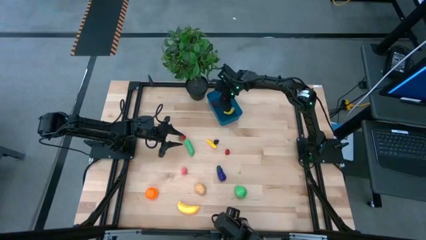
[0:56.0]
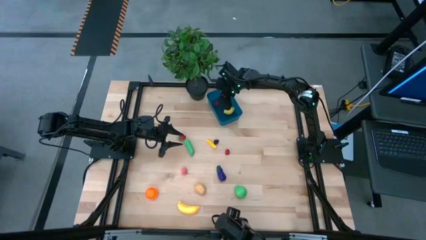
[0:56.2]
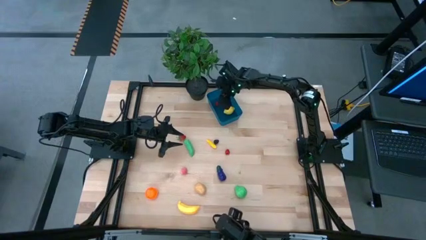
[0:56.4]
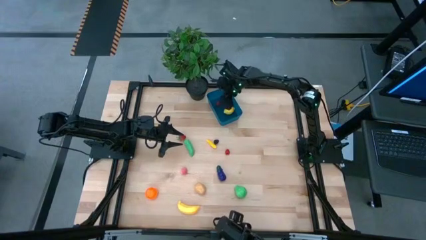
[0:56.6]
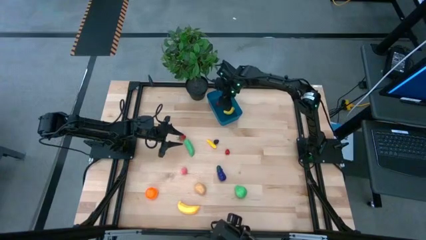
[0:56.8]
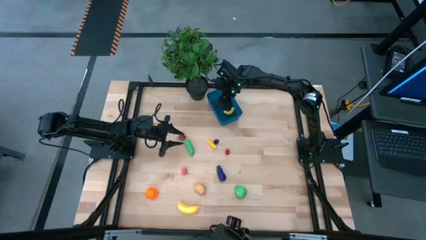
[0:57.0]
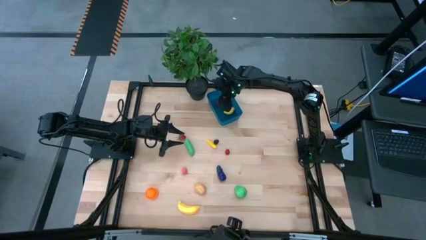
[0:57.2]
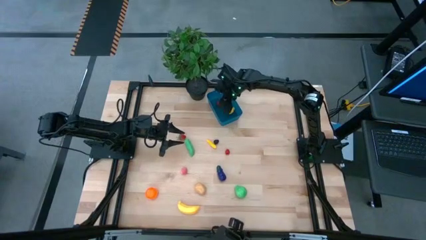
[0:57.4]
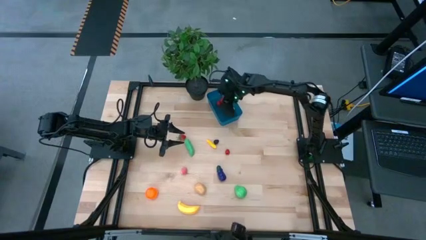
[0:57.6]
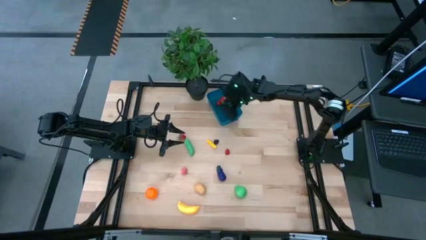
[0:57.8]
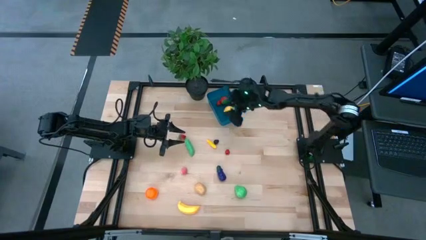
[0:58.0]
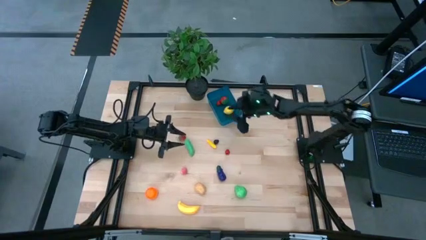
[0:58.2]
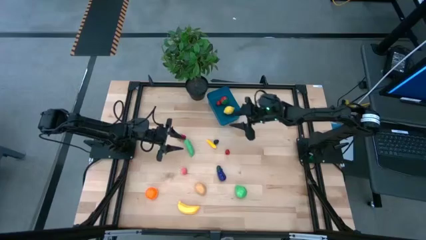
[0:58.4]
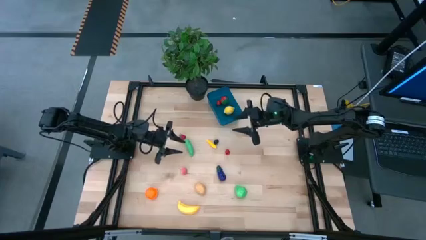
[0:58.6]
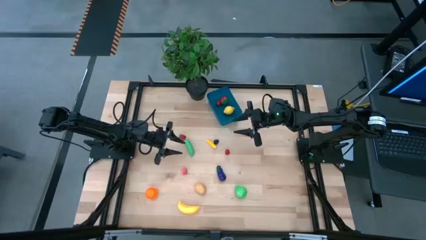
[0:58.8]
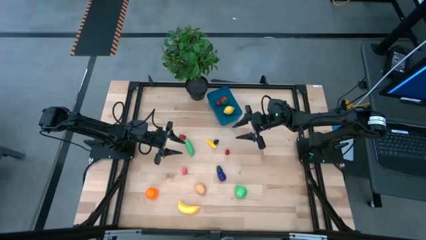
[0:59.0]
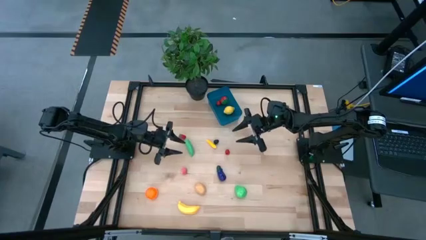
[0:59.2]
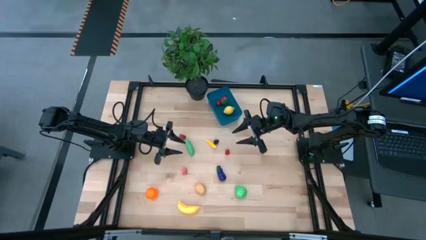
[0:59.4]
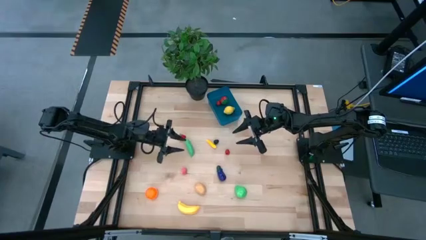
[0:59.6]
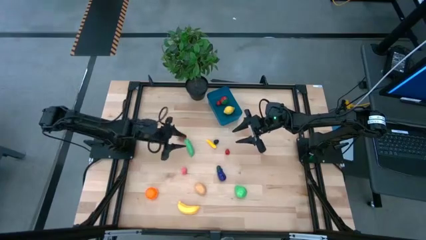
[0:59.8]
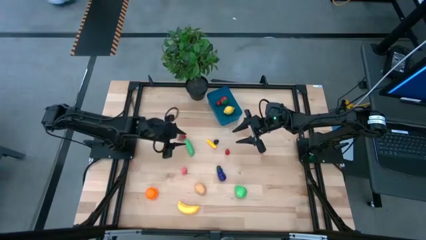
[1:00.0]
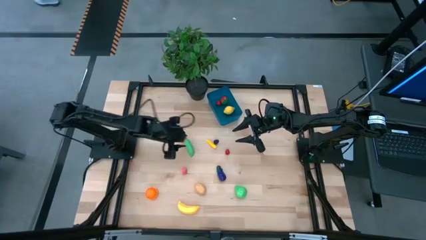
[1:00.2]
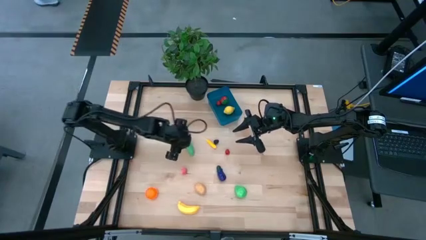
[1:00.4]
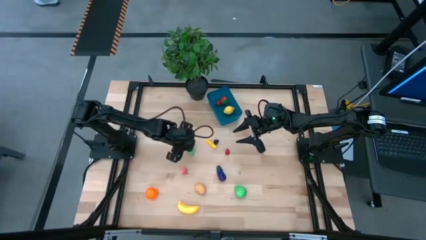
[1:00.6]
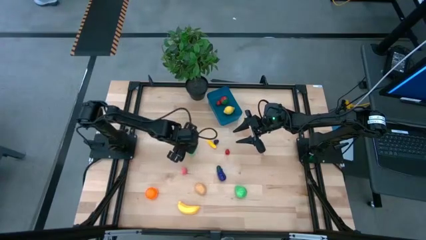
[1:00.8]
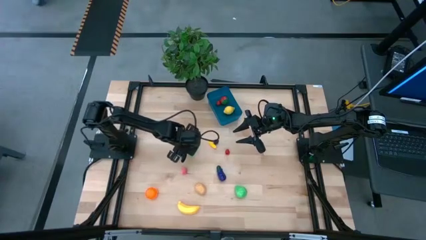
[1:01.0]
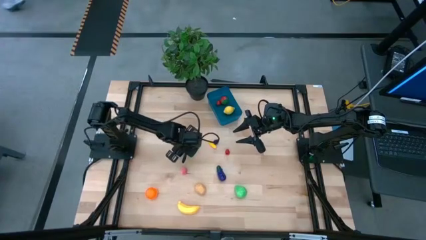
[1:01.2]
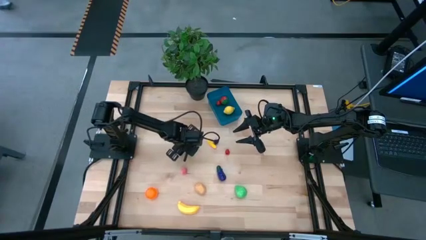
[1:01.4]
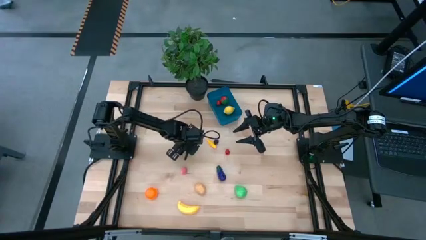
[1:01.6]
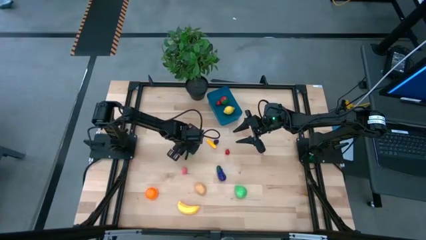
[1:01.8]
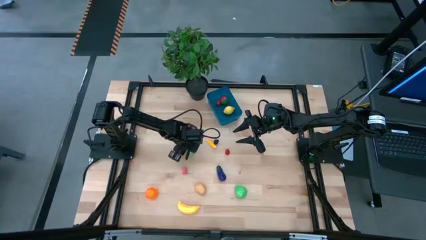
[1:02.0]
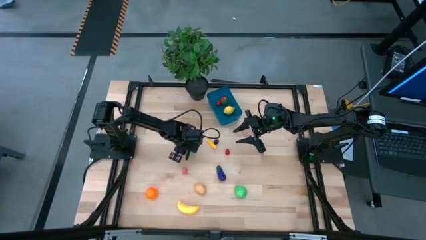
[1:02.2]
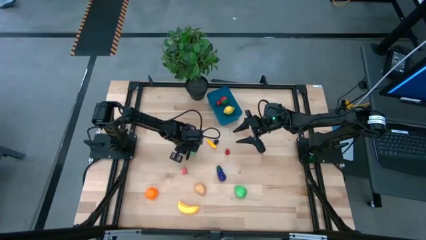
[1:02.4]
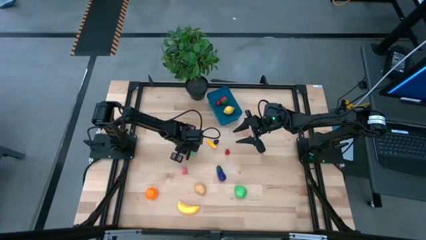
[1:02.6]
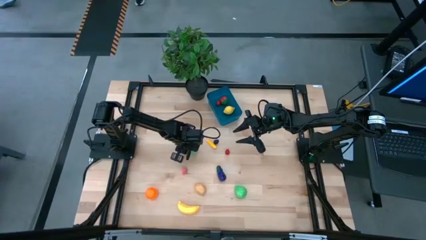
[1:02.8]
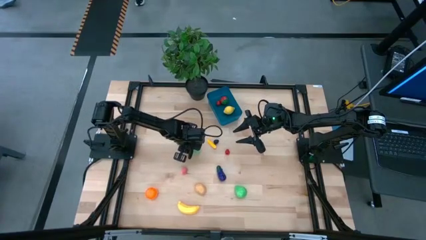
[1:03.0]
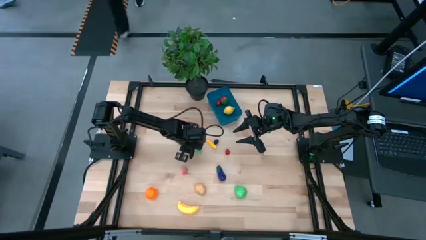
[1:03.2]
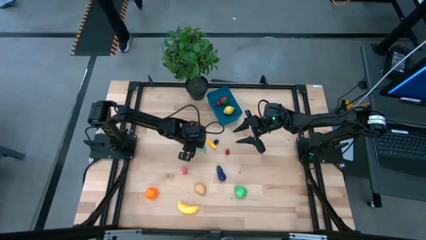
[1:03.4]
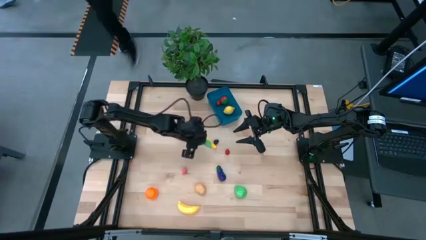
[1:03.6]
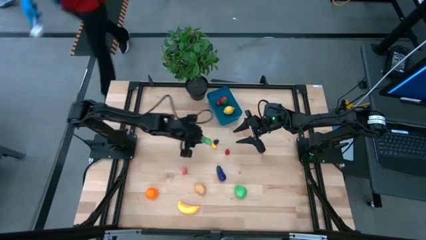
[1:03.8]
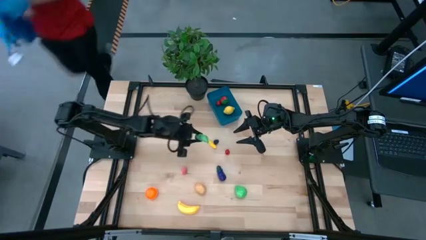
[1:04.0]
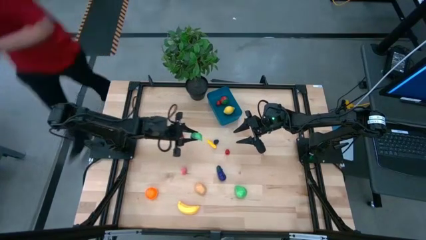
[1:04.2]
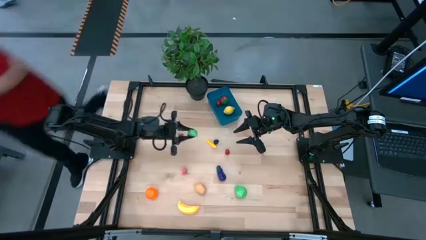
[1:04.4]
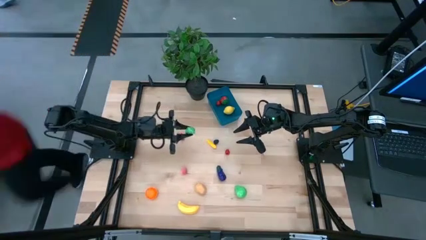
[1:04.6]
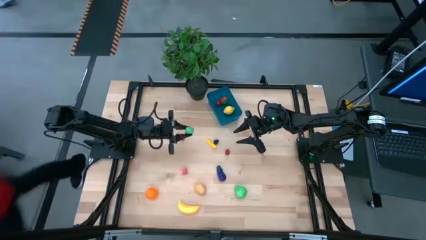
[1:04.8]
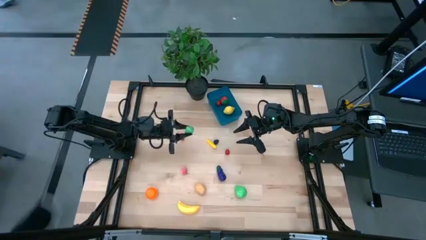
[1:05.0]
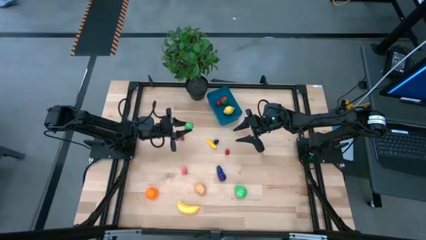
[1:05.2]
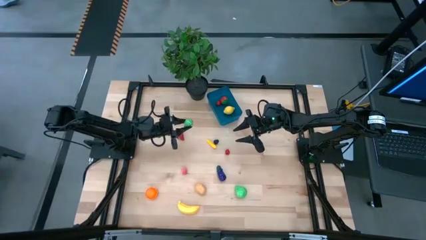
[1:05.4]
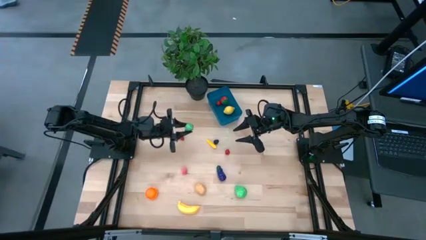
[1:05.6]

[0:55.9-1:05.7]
Task: Pick and placing Produce into tupperware
Put the string bean into the blue bin

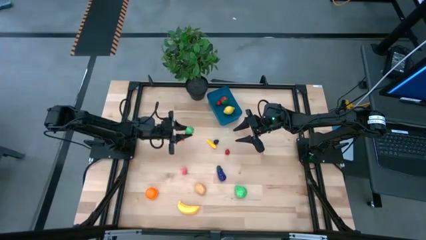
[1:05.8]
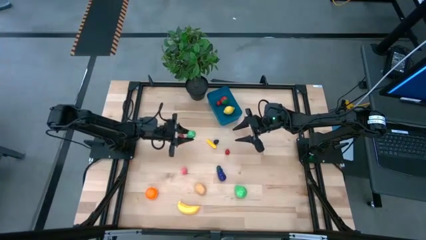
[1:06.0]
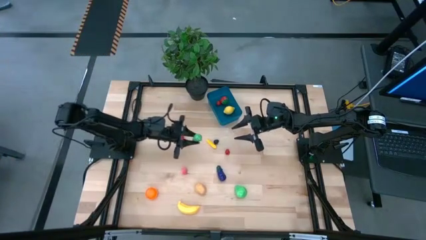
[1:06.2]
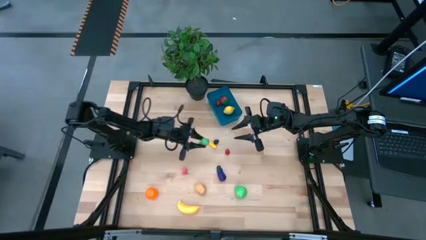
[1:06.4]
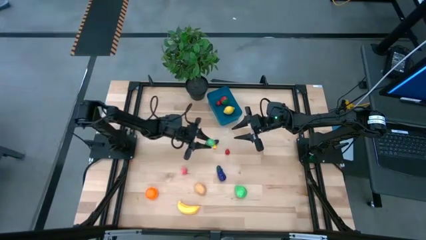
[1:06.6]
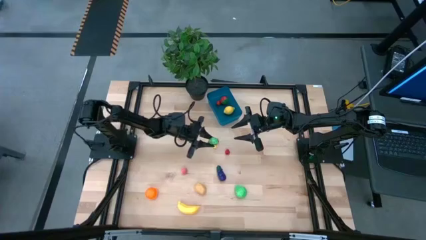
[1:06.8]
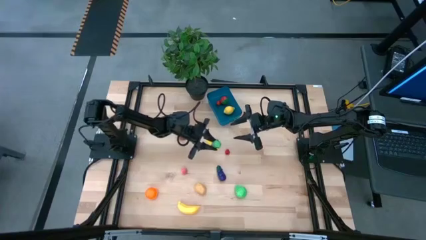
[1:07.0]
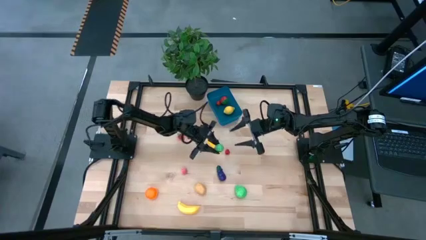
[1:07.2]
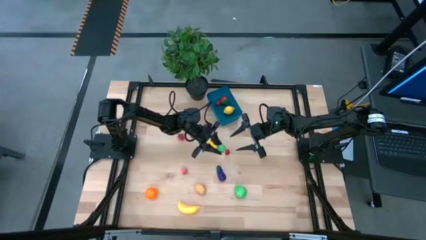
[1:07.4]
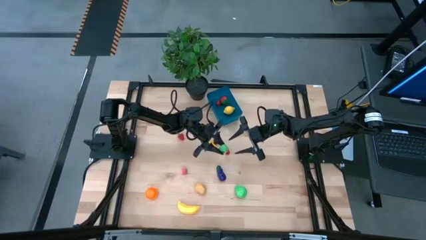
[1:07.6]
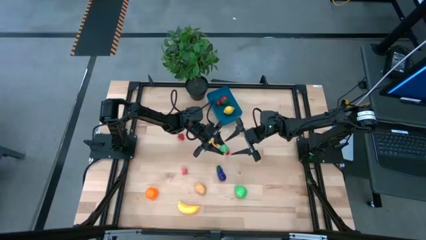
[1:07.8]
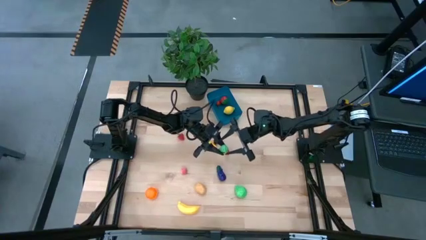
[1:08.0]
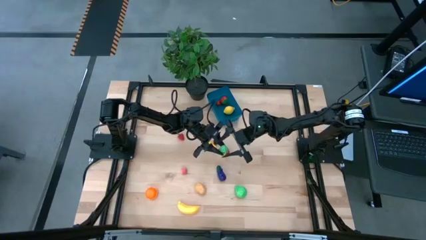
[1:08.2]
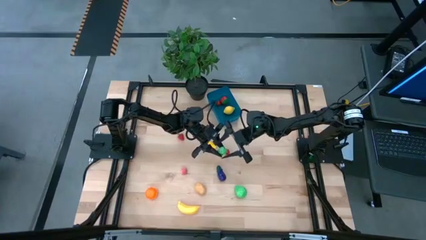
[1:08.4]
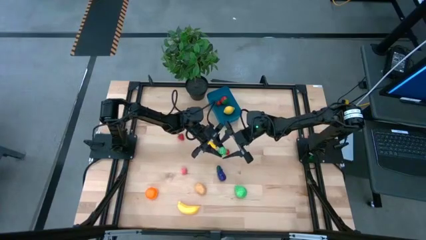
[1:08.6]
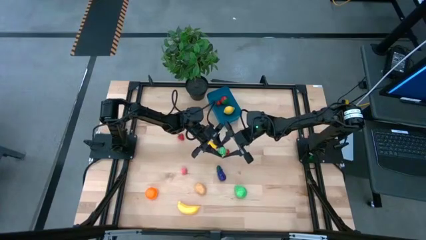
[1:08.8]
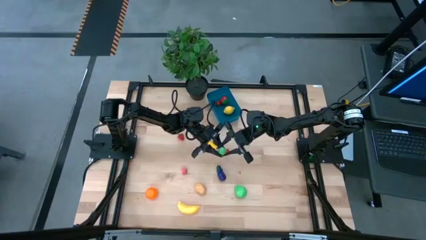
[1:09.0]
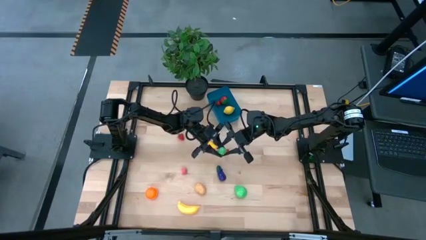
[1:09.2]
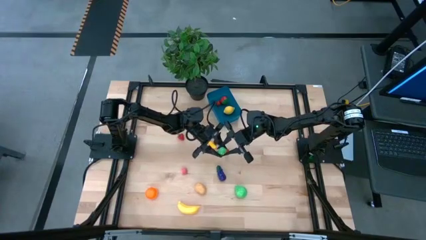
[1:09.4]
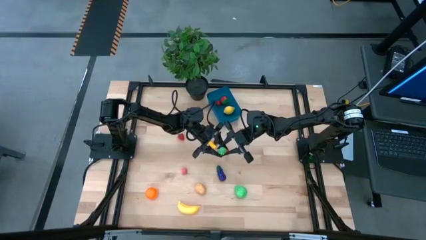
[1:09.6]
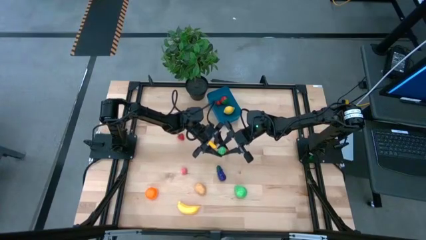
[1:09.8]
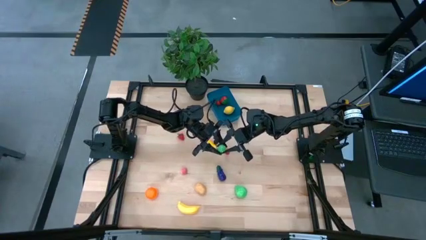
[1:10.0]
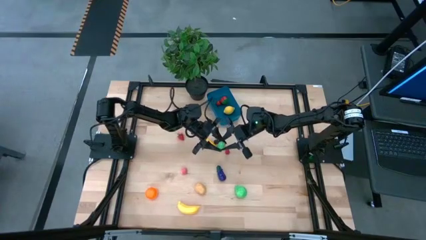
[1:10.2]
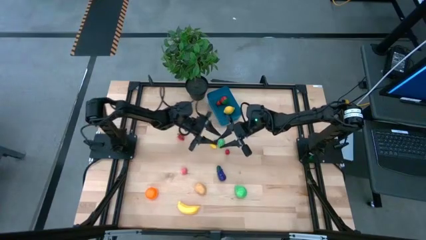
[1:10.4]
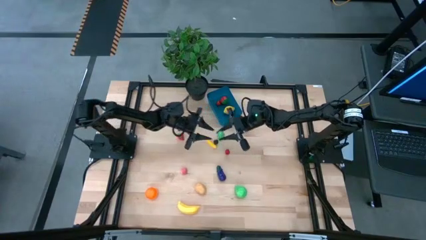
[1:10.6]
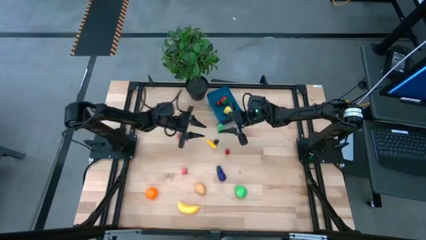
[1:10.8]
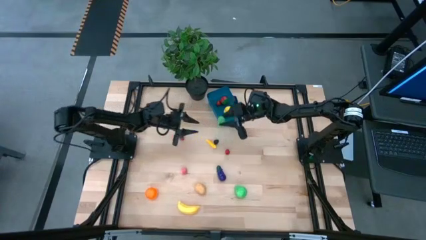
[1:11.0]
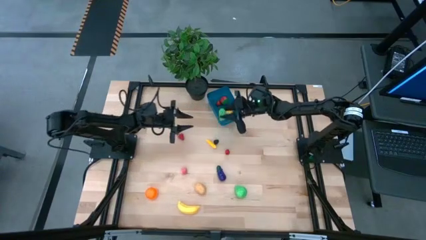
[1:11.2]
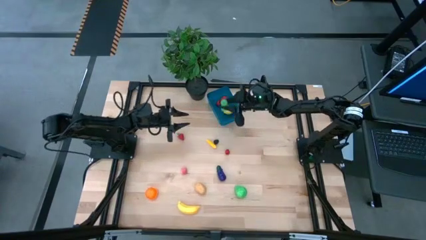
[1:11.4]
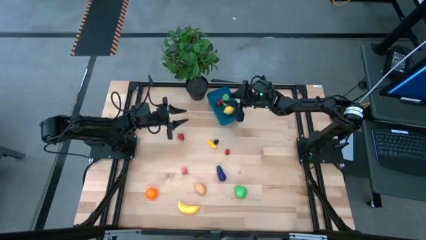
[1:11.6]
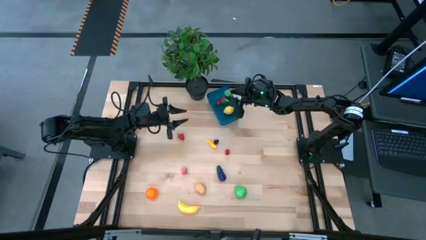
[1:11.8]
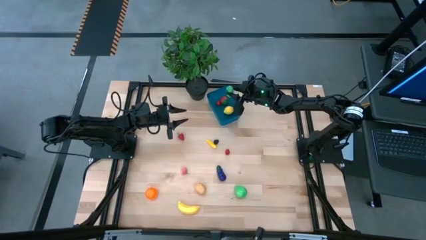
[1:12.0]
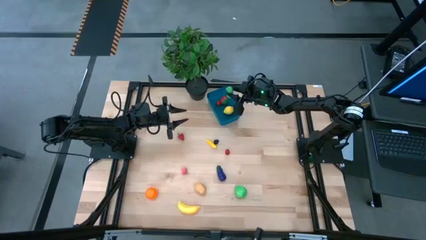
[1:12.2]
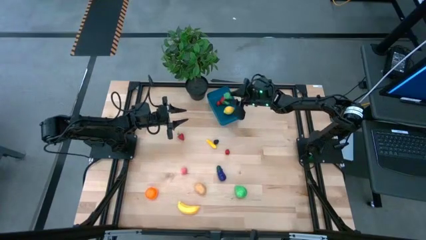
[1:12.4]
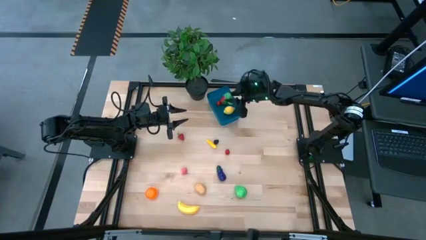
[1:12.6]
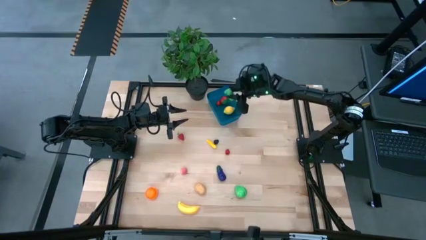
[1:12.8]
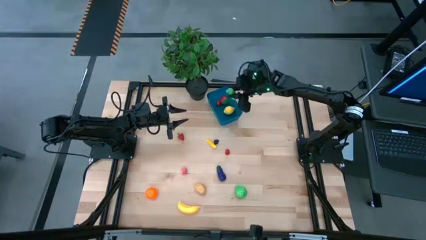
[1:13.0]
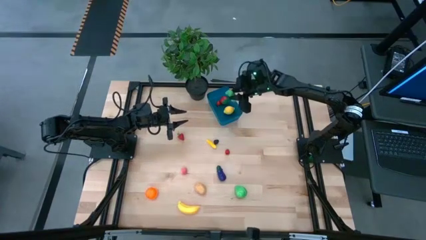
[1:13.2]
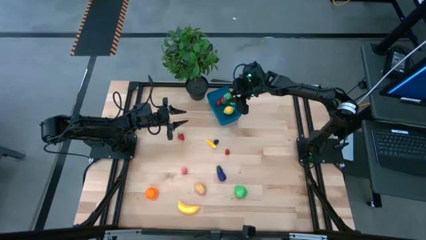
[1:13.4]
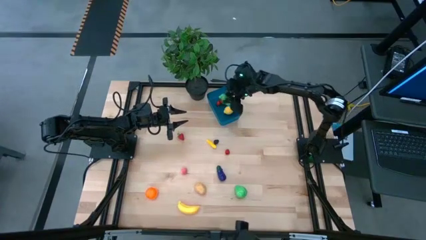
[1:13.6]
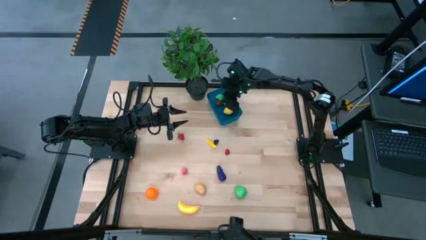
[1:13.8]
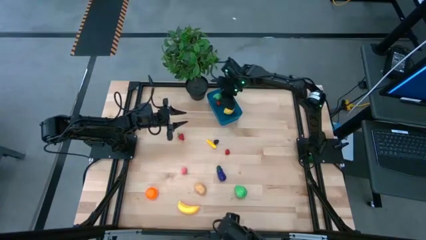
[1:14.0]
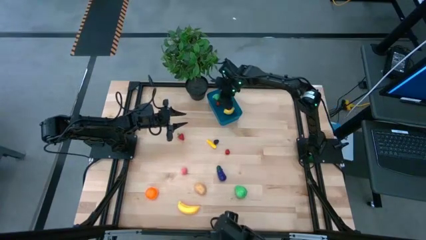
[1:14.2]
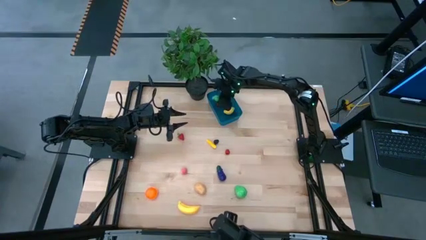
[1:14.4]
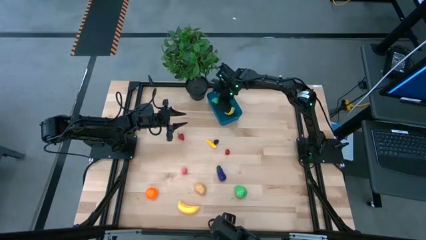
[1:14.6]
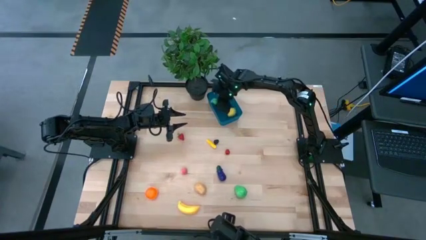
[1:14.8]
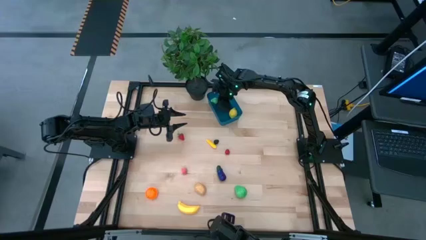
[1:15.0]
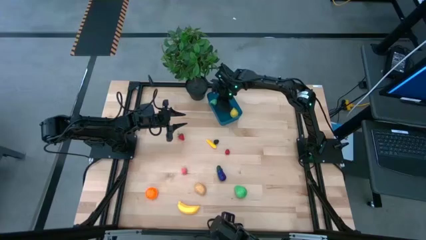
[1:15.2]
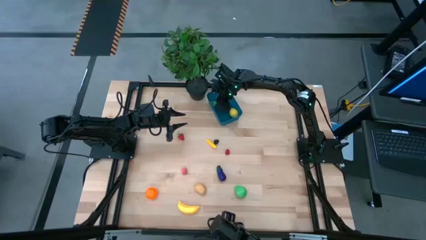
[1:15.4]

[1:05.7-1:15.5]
Put the string bean into the blue bin
